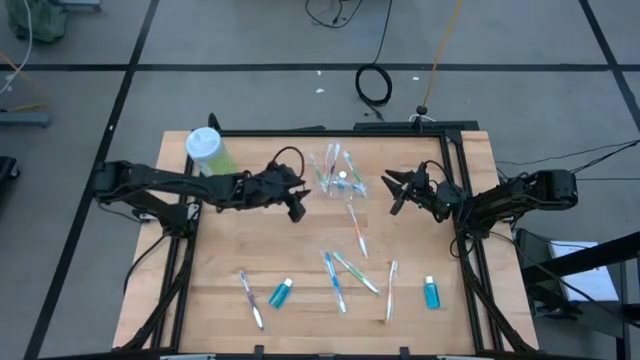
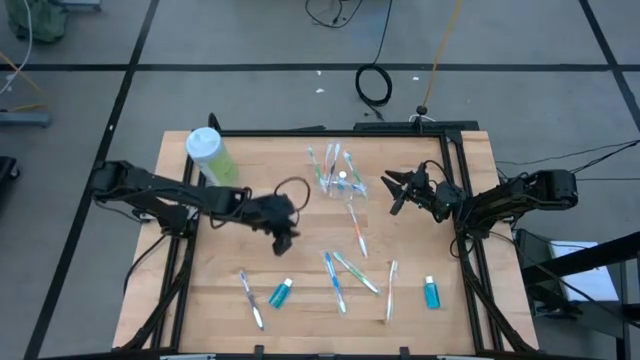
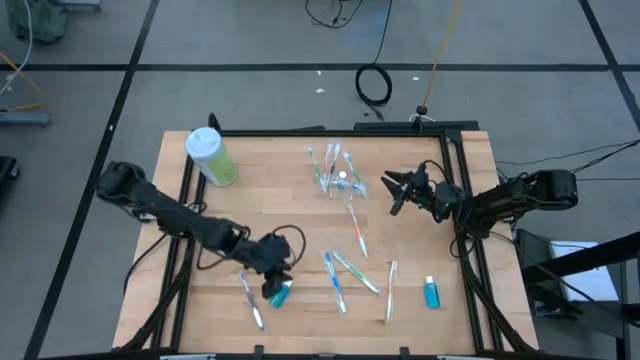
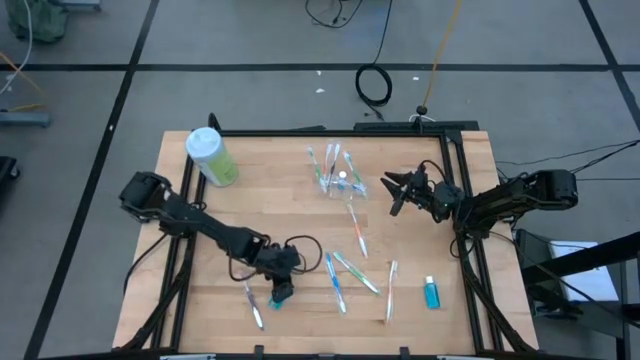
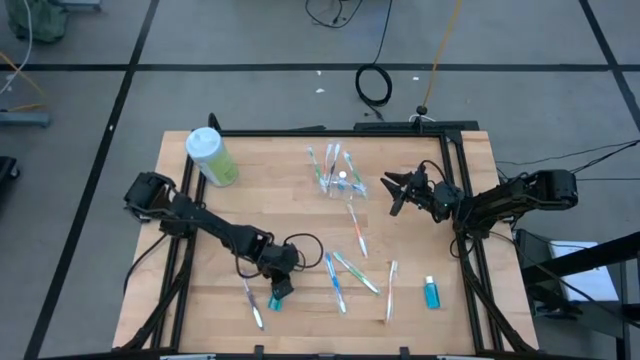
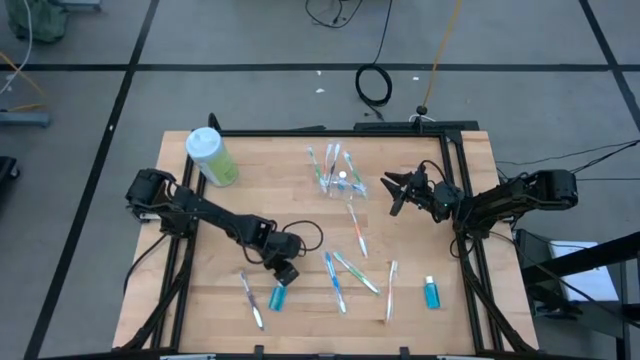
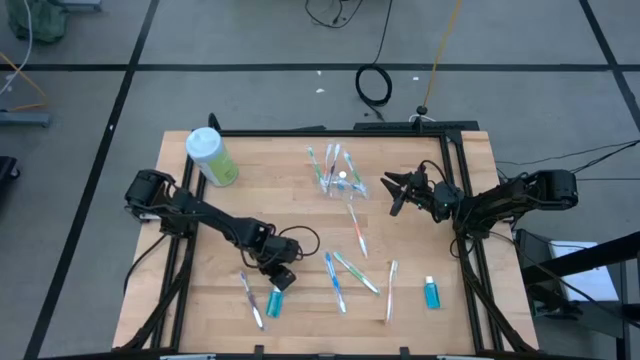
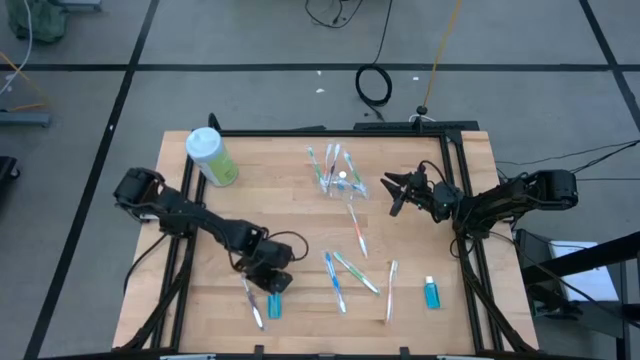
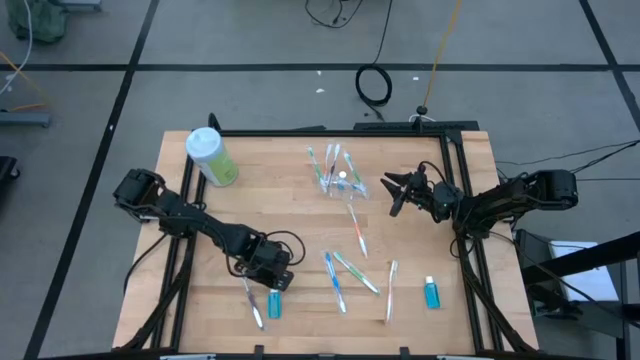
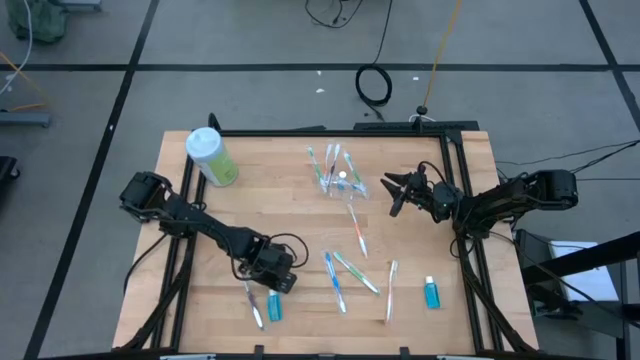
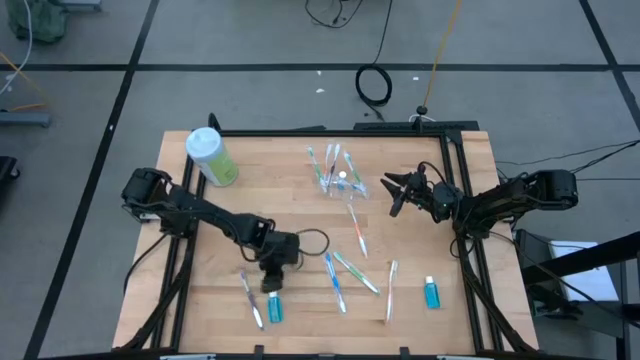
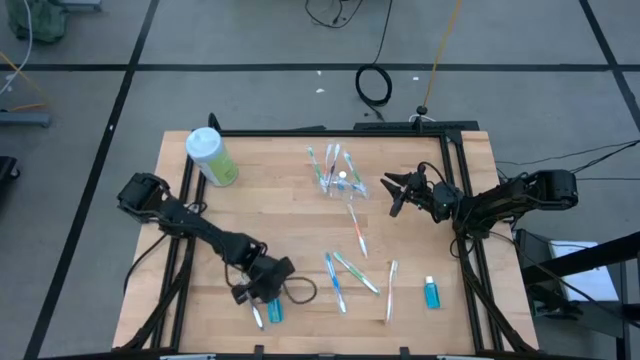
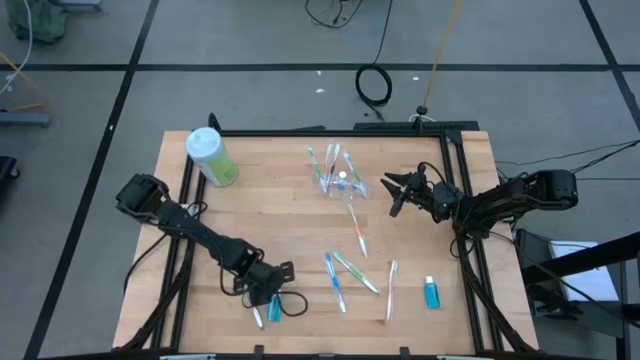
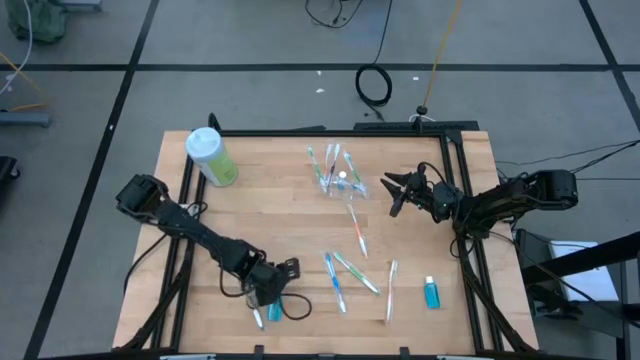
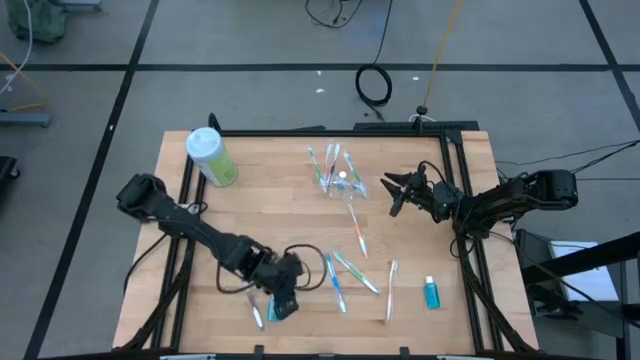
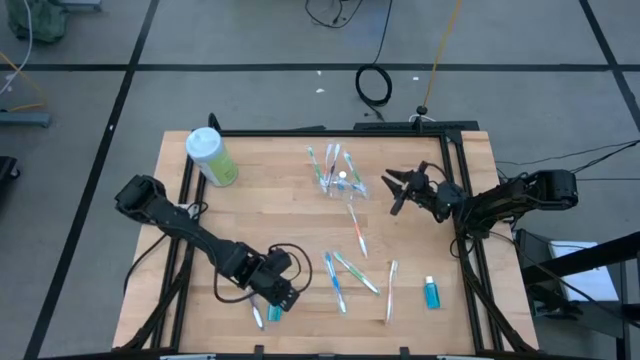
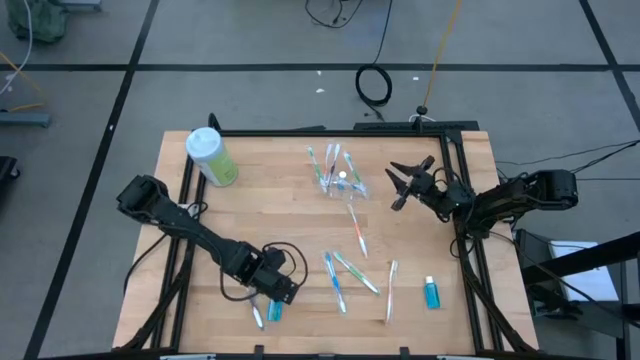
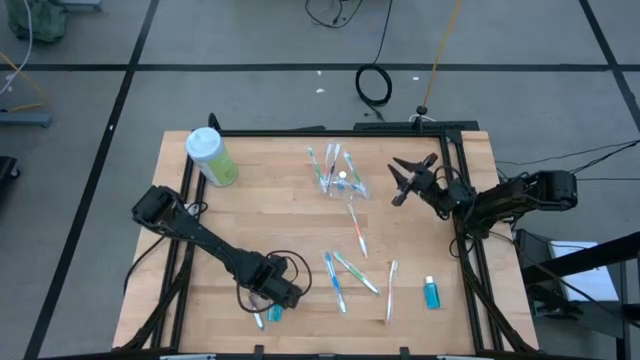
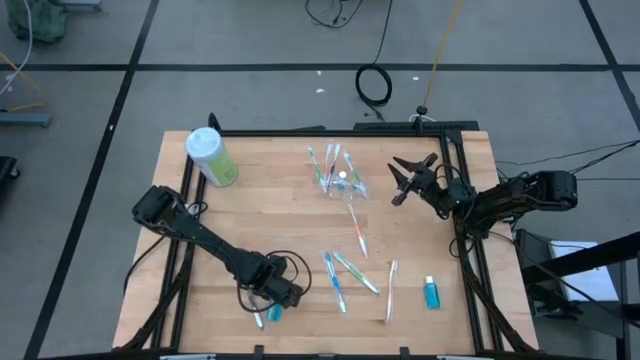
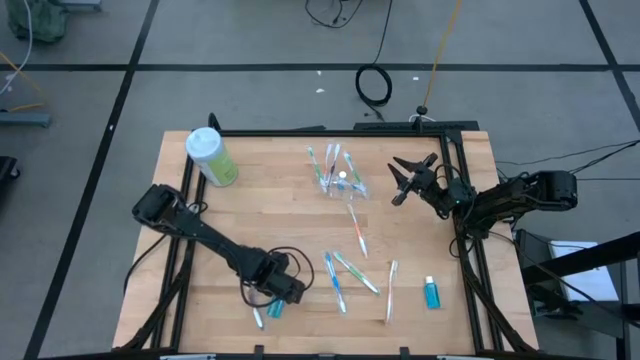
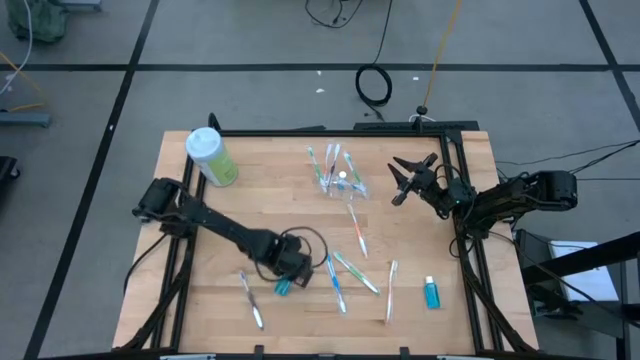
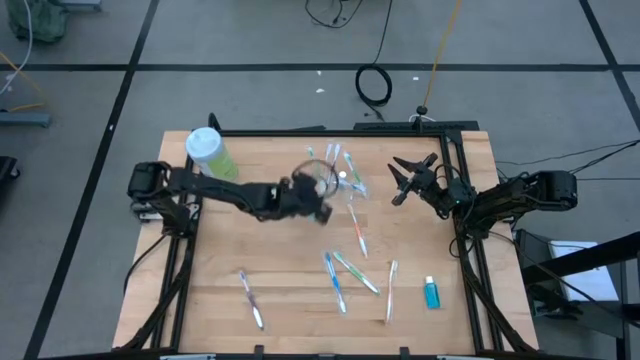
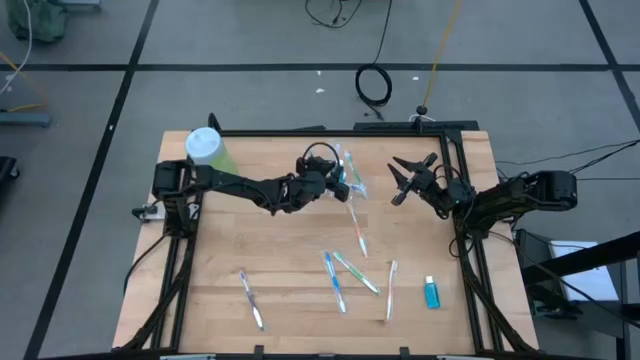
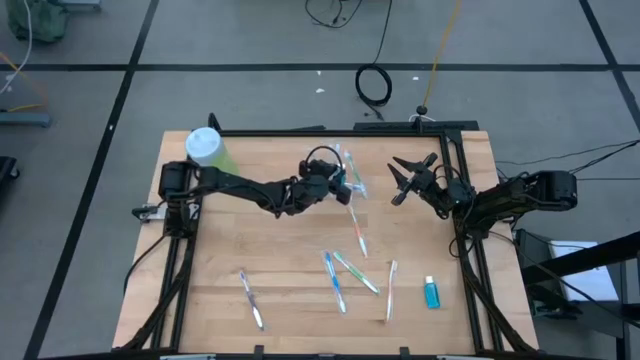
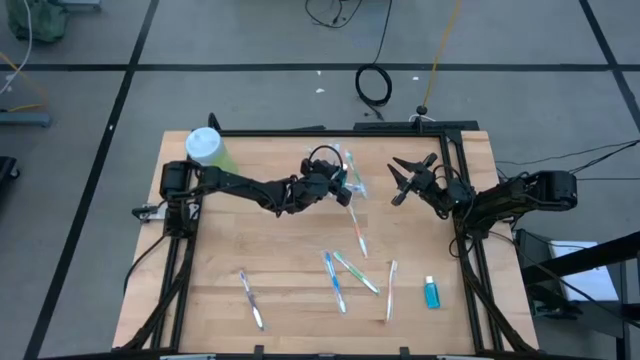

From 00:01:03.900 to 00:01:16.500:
Task: Pick & Place toothbrushing station
Put the left blue mouthwash into the transparent organizer

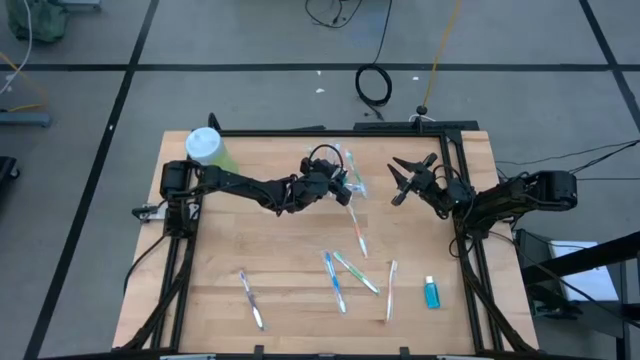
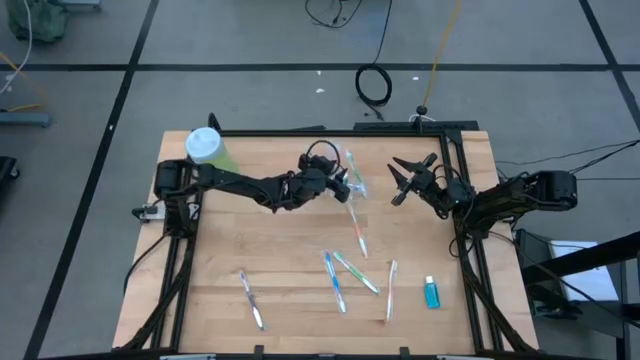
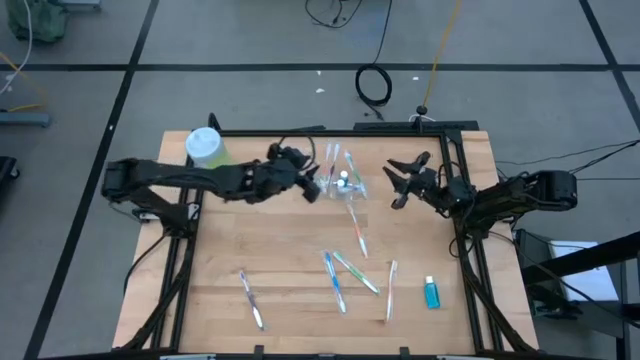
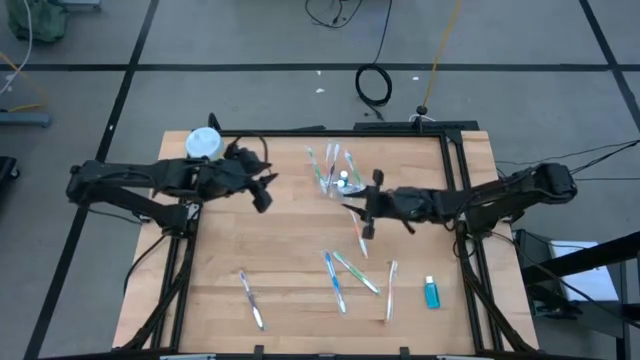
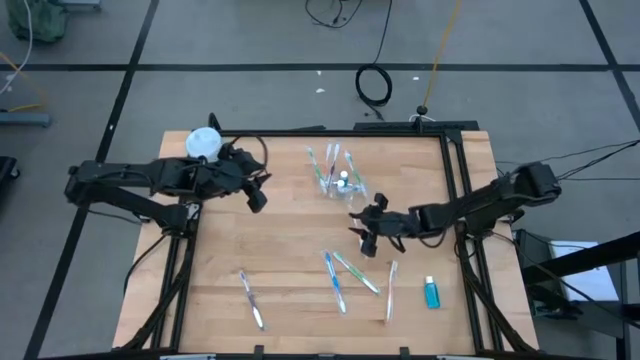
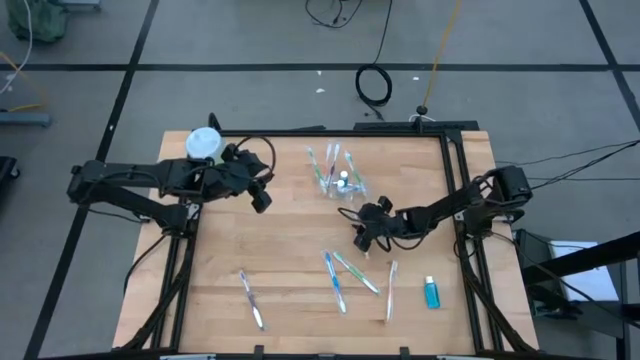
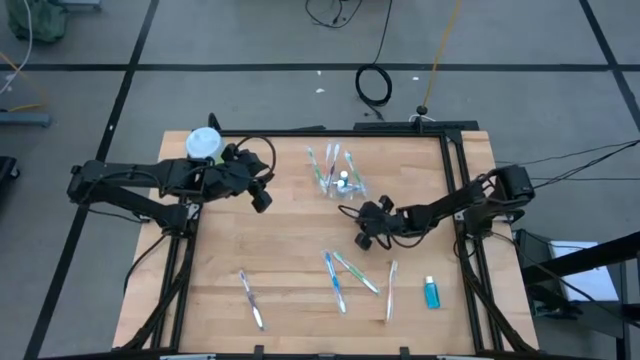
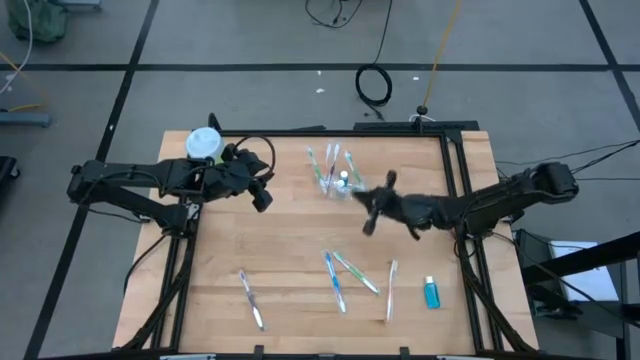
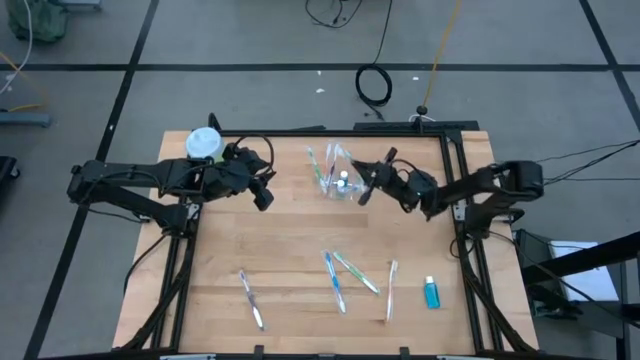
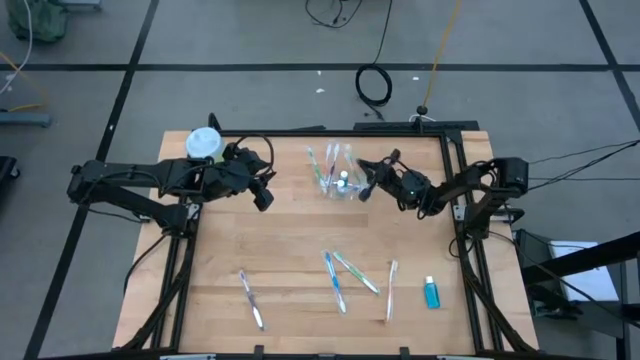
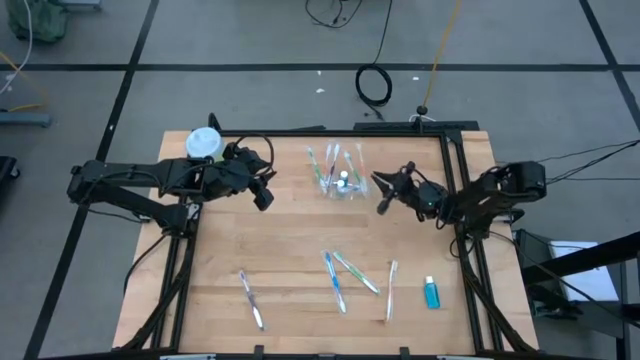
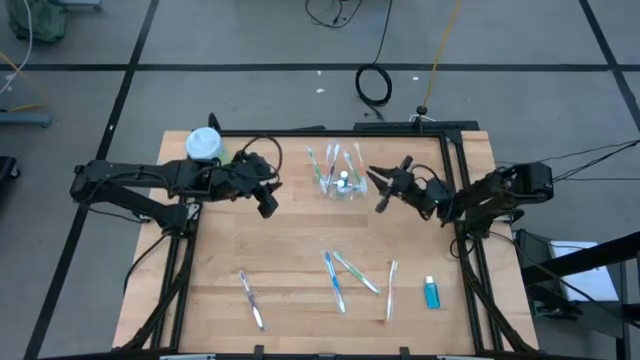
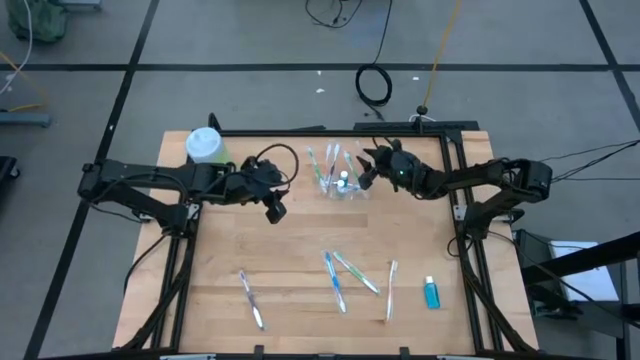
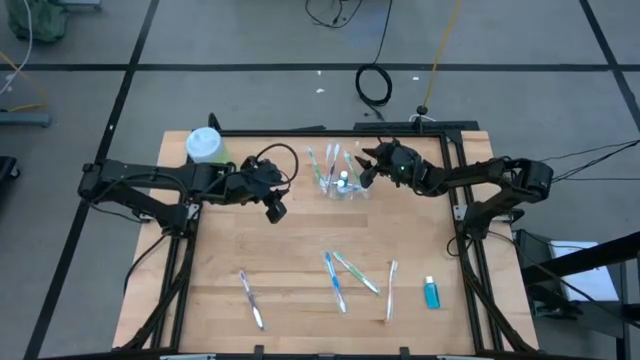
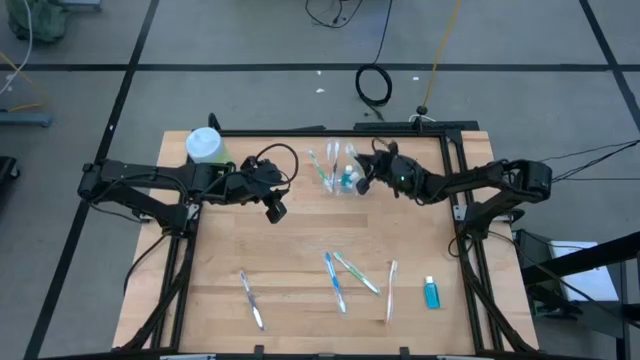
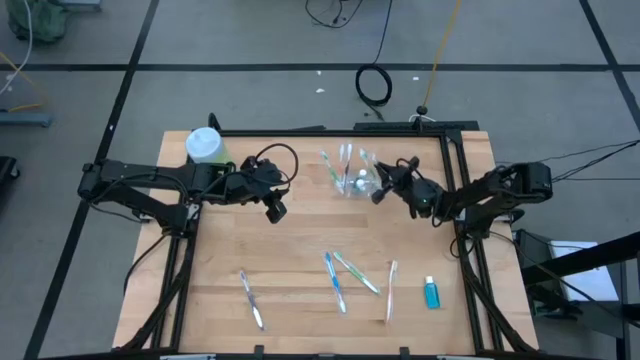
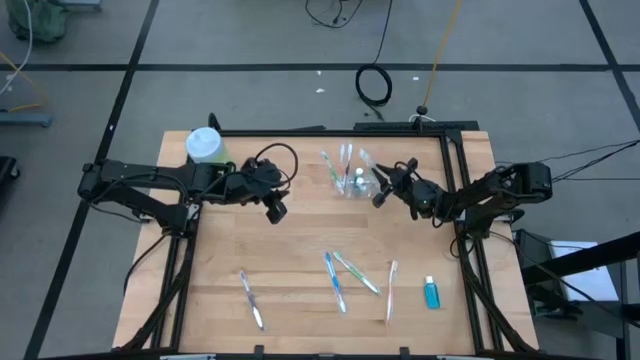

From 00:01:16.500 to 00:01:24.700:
Put the top orange toothbrush into the transparent organizer

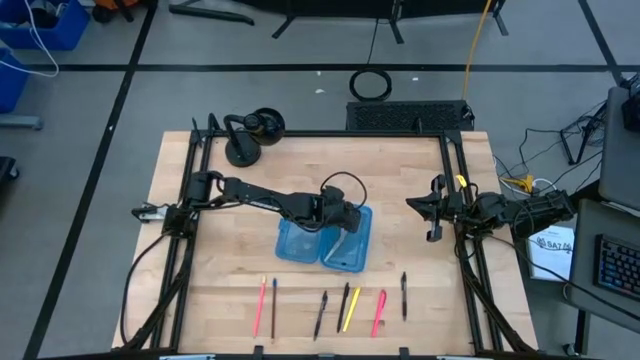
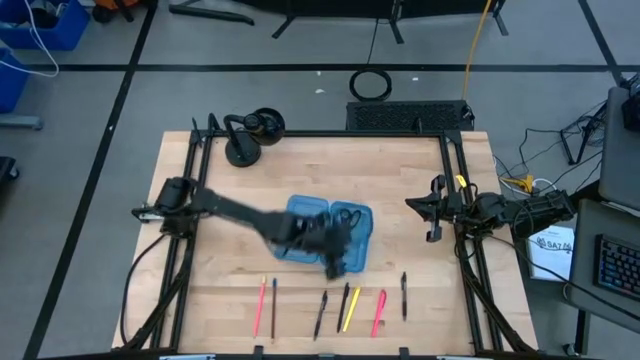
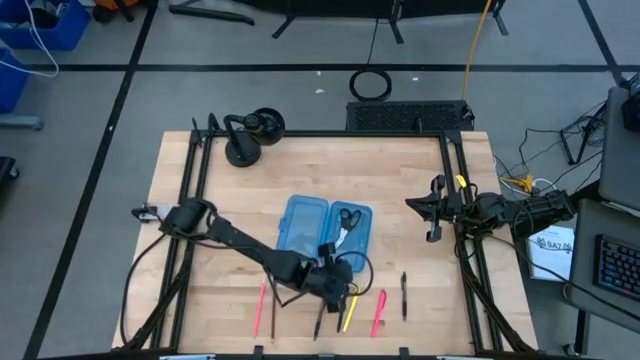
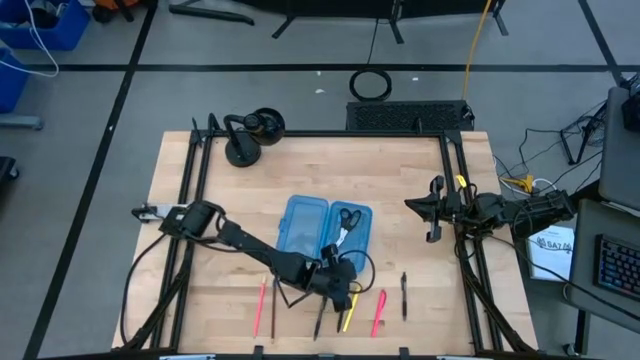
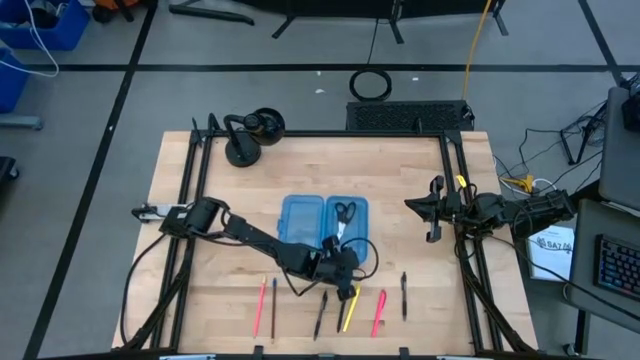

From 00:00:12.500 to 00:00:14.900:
Task: Pick & place school supplies into a supply box
Adjust the blue supply box
